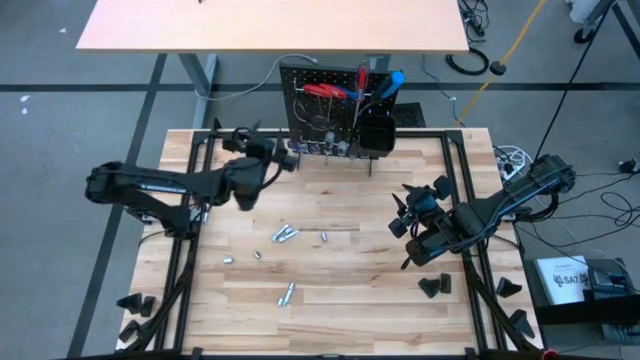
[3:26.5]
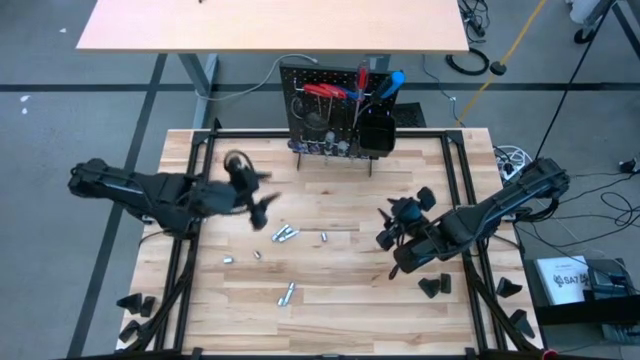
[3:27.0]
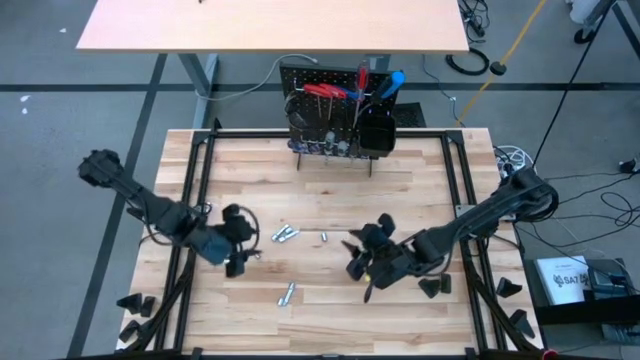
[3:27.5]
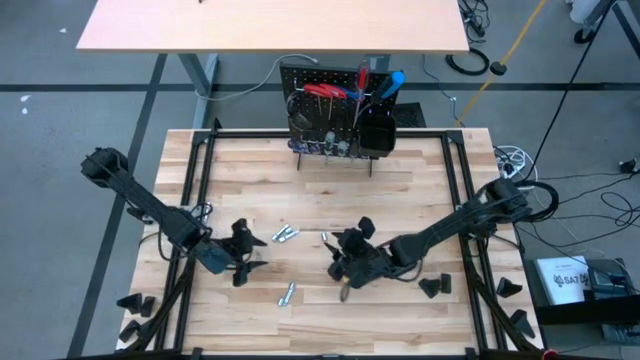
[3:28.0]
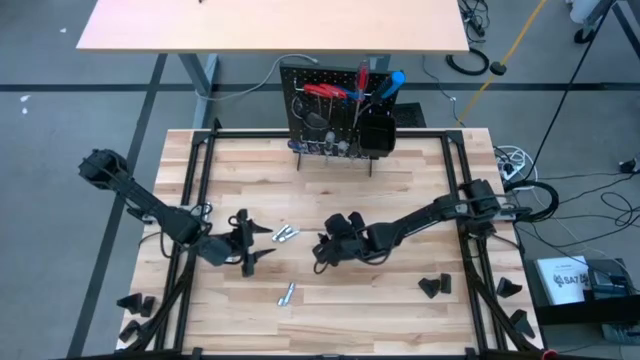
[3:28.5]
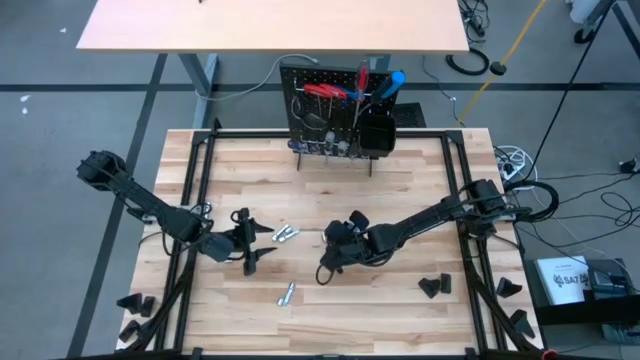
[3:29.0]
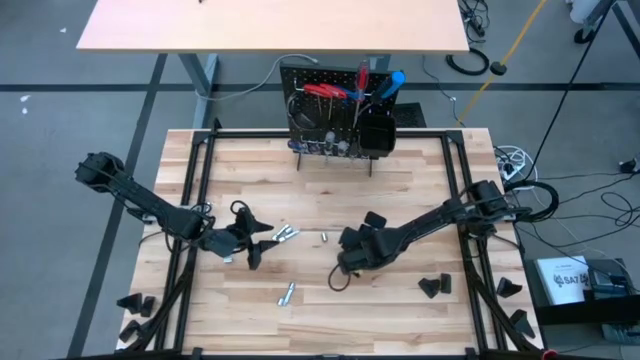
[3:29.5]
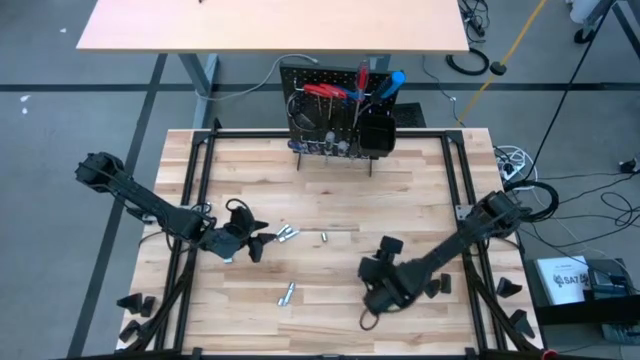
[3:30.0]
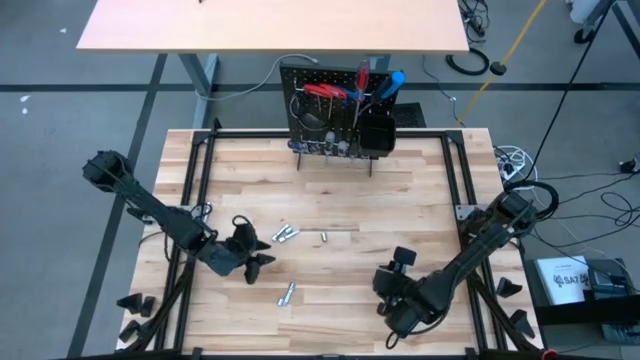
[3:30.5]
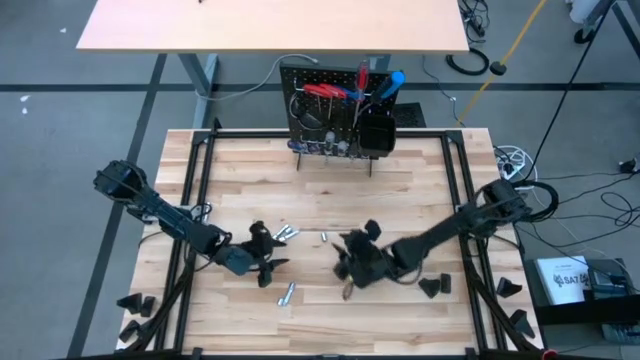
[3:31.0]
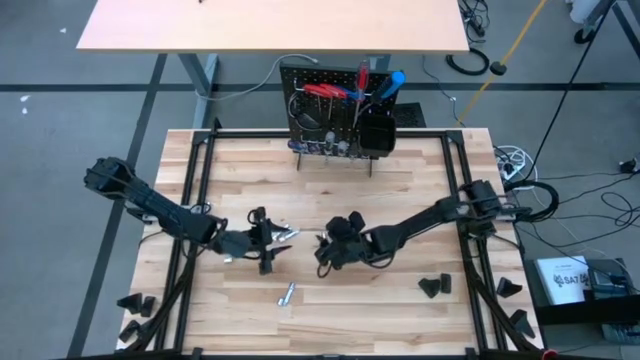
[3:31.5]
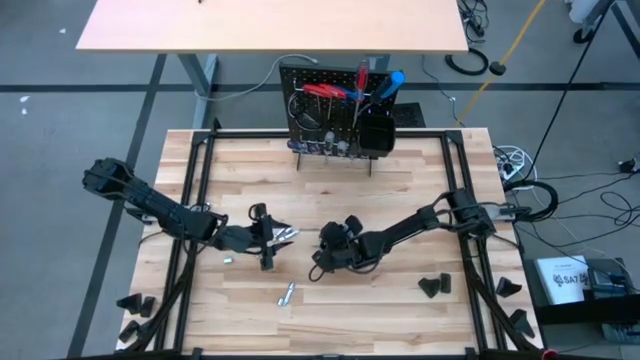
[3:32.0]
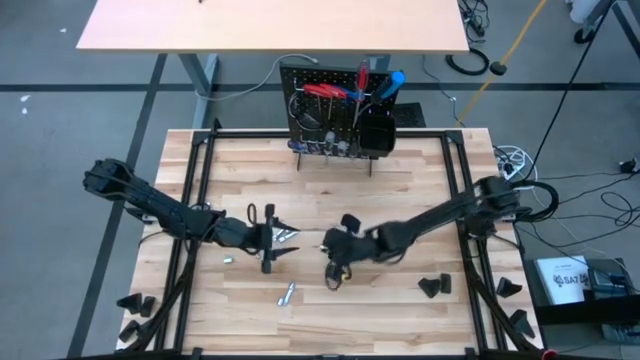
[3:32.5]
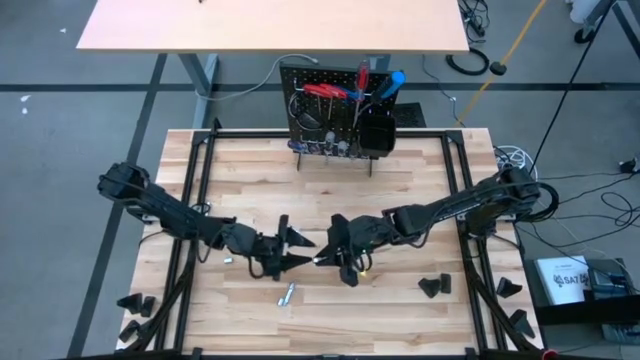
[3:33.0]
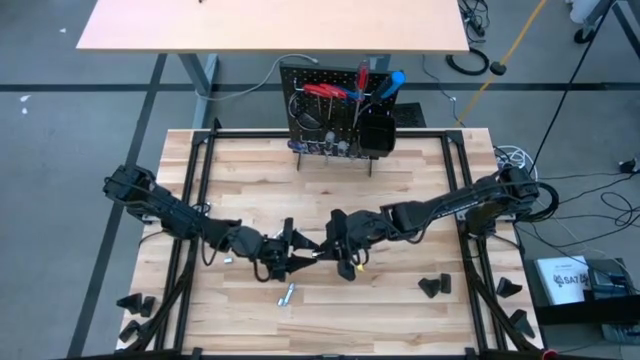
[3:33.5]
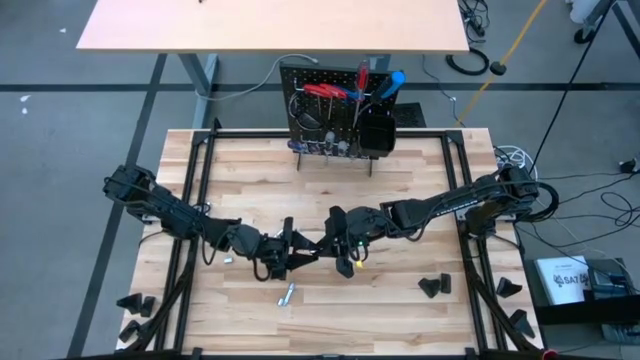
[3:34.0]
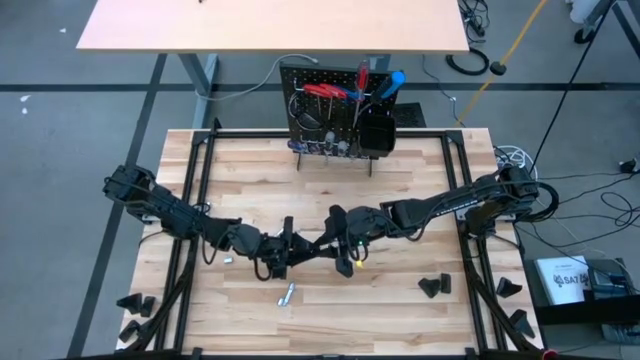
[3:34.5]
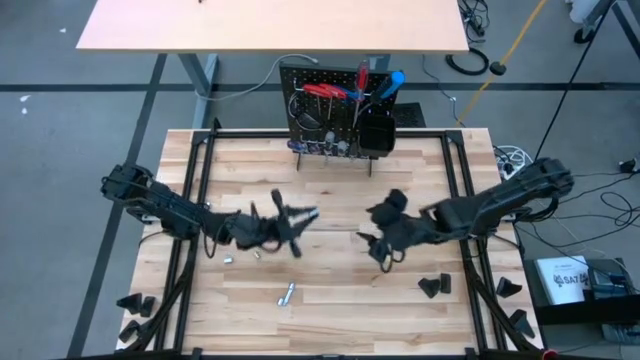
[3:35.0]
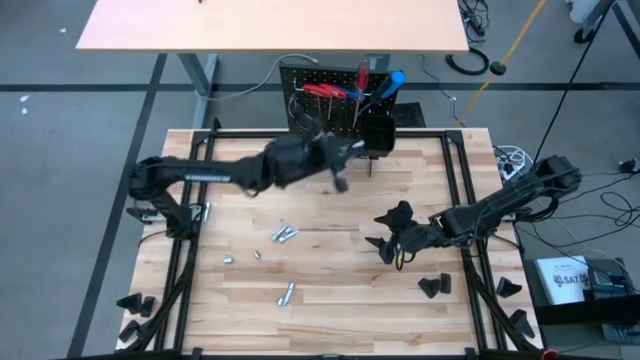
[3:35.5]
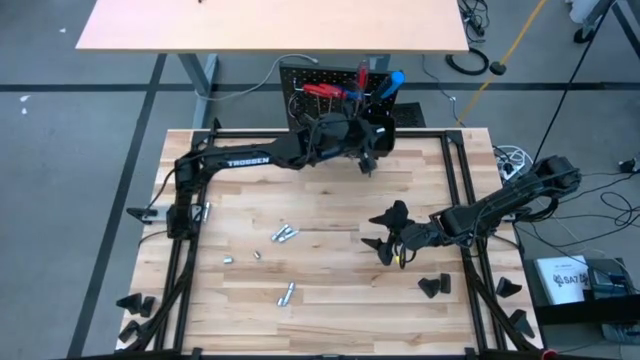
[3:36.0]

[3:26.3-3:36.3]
Task: Hang tools onto peg board
Put the silver socket into the black bin on the peg board

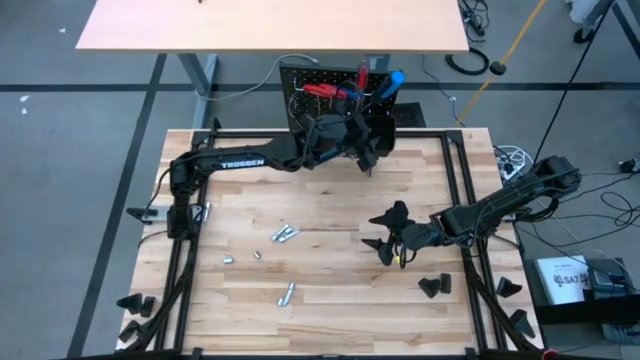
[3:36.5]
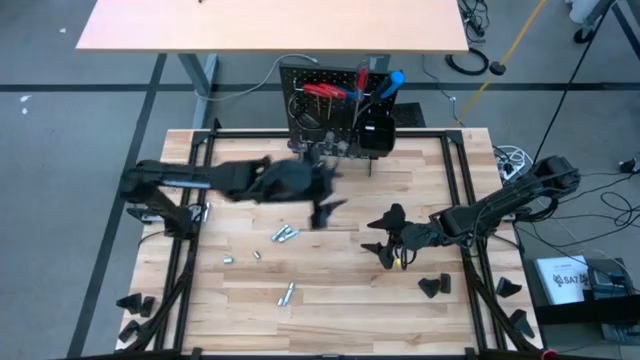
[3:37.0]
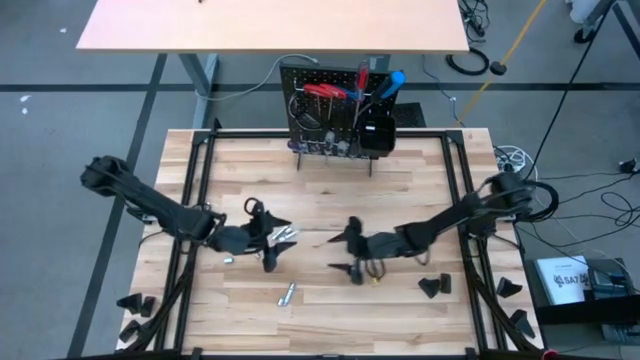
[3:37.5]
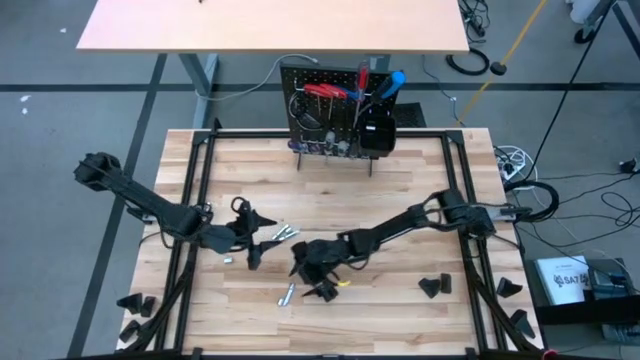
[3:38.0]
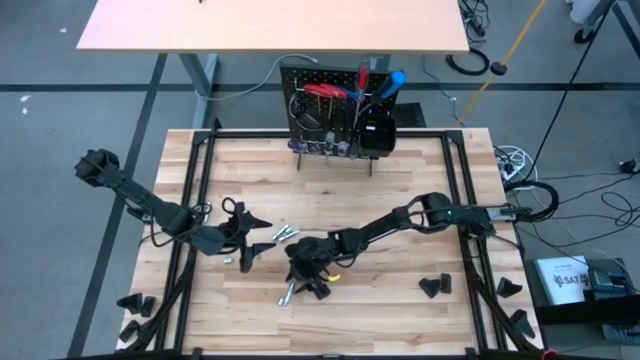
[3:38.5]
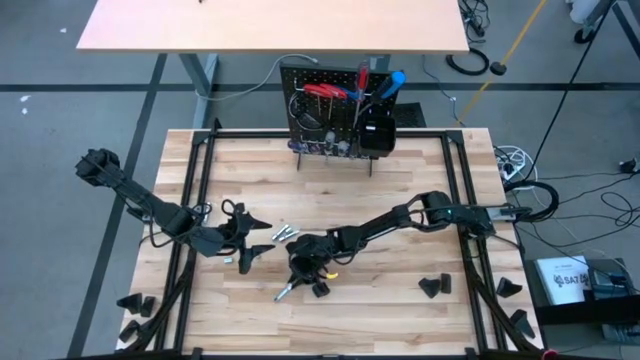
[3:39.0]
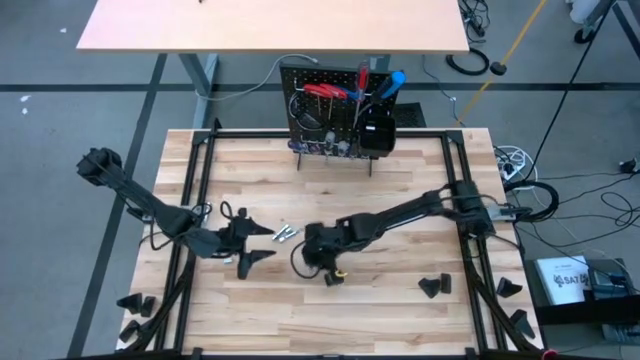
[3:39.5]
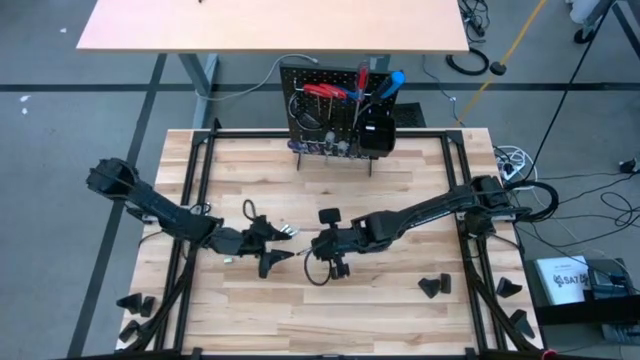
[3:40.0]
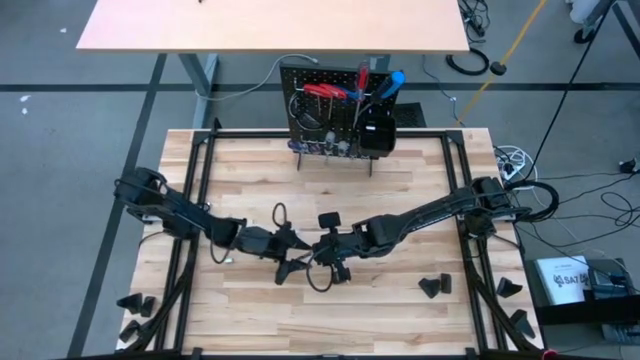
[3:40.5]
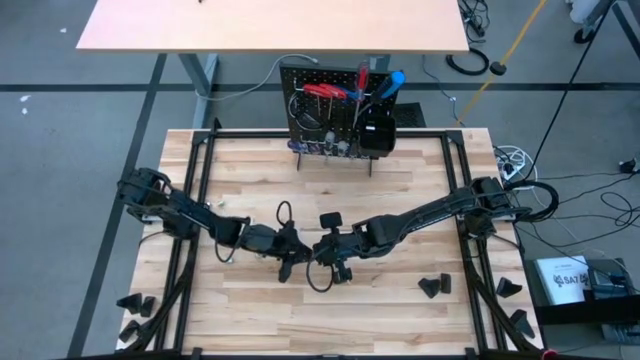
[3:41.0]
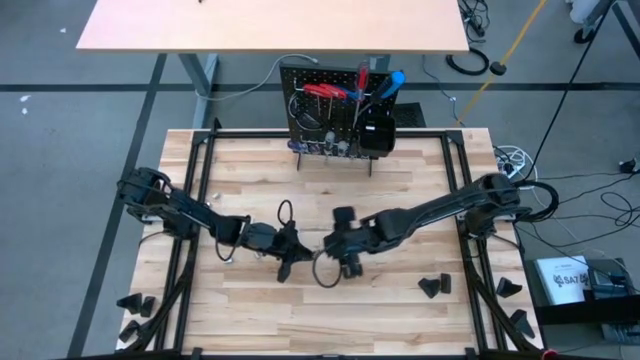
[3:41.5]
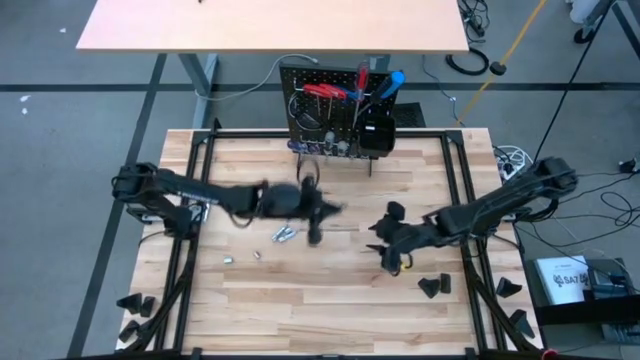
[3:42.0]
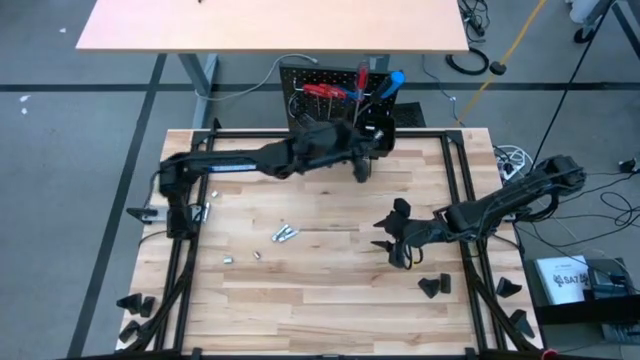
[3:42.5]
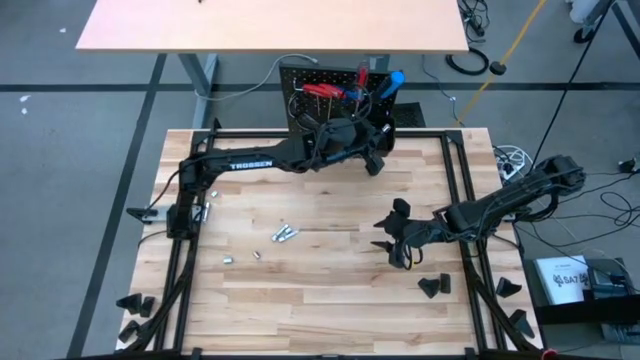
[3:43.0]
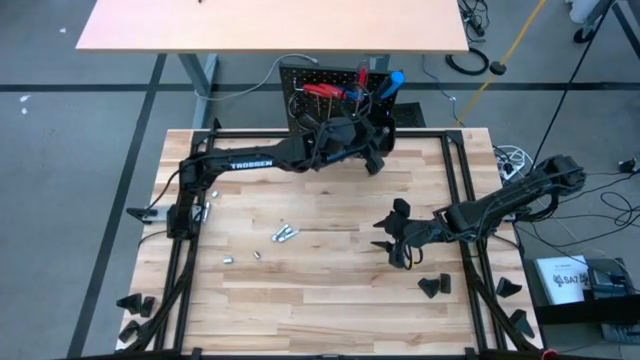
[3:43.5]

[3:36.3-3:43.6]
Put the silver extension bar into the black bin on the peg board

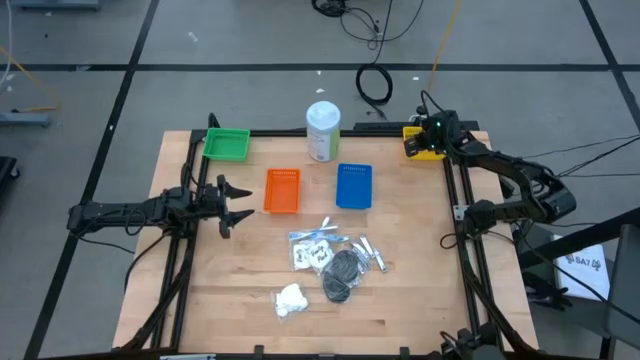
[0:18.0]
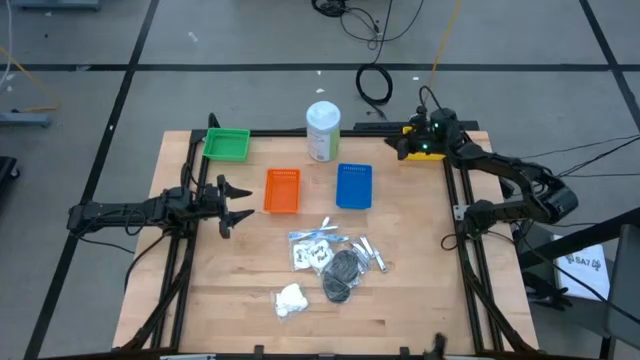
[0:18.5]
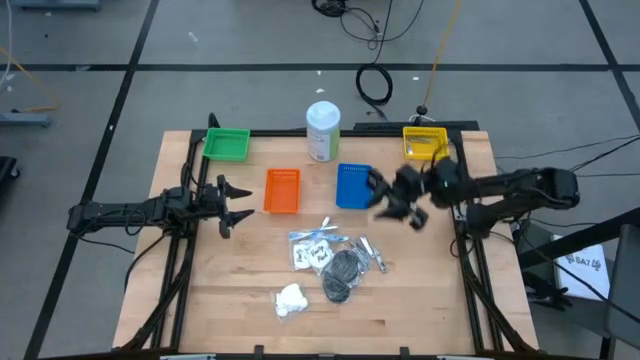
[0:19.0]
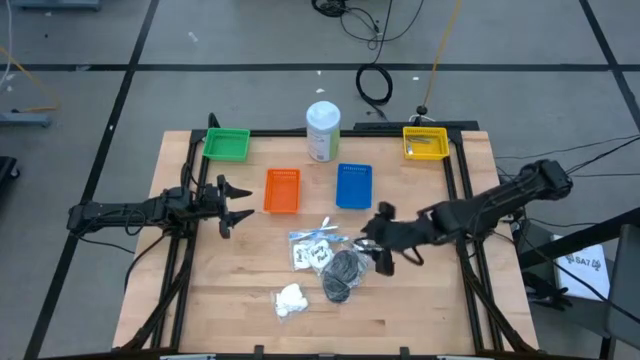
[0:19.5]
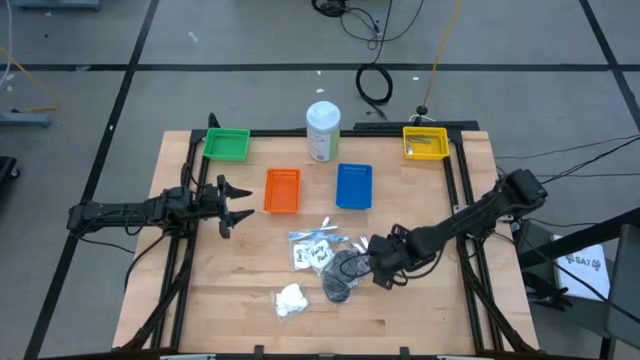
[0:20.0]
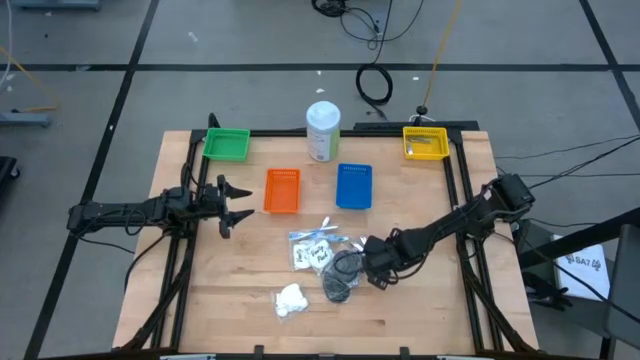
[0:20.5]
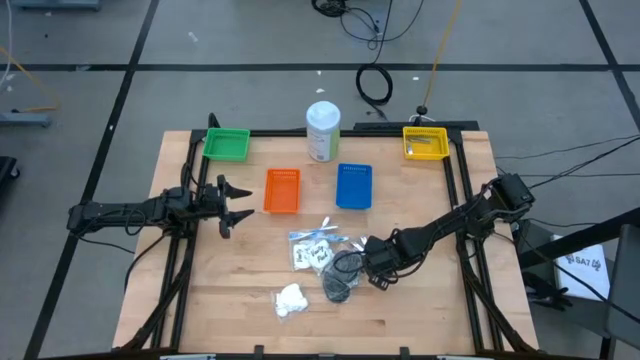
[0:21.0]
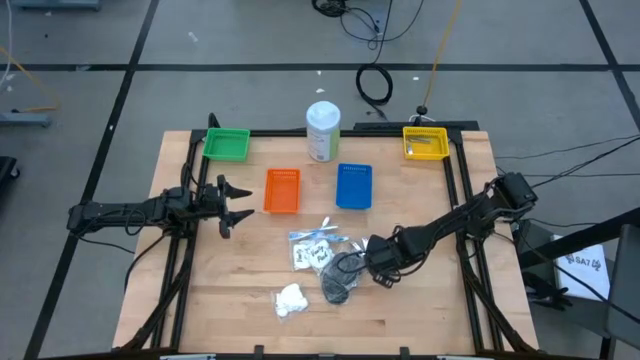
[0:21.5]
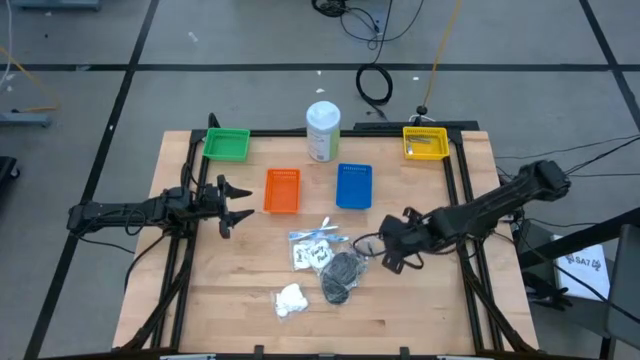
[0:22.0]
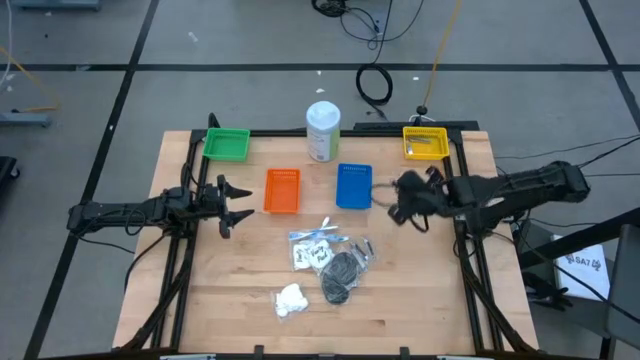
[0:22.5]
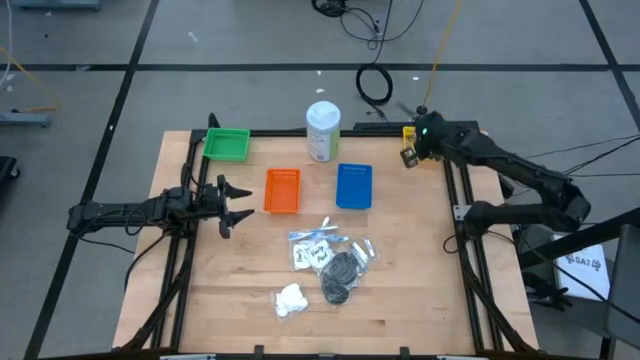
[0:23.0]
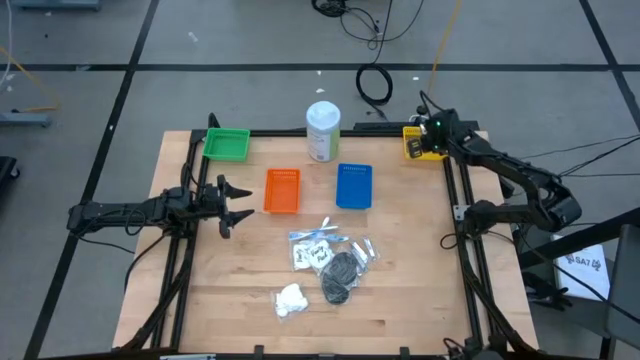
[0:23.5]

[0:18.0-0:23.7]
Task: Pick & Place Travel size toiletries
Put the nail cutter into the yellow bin
